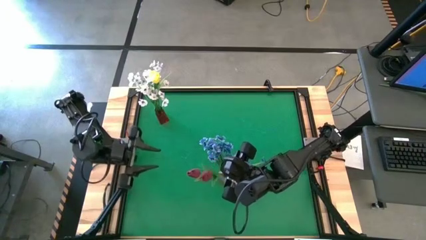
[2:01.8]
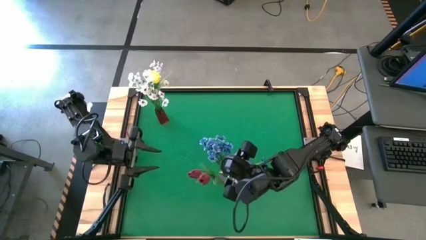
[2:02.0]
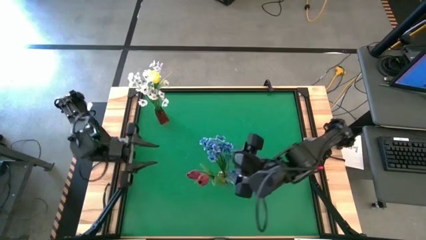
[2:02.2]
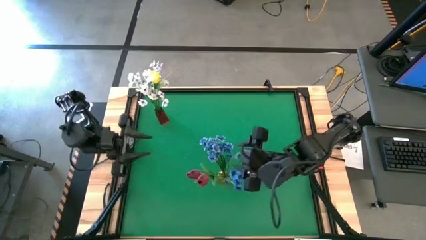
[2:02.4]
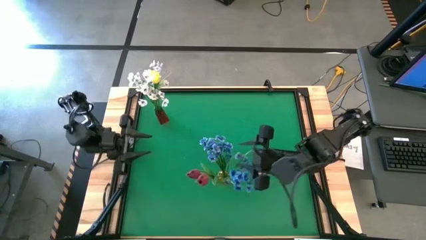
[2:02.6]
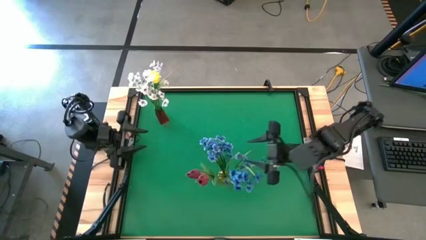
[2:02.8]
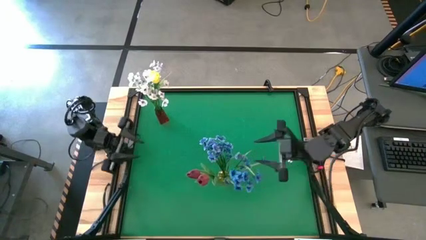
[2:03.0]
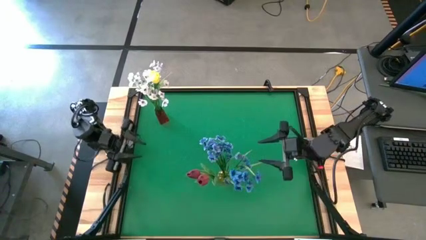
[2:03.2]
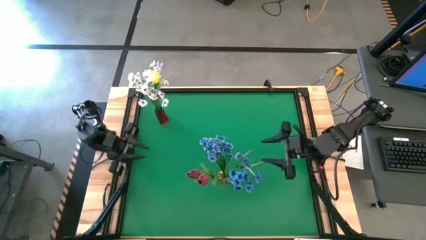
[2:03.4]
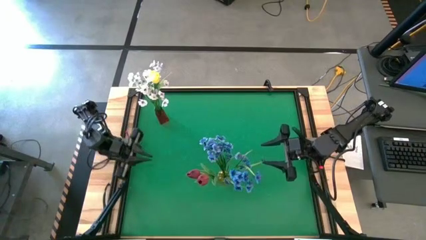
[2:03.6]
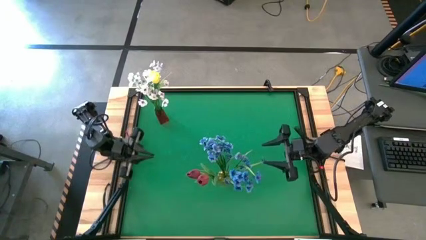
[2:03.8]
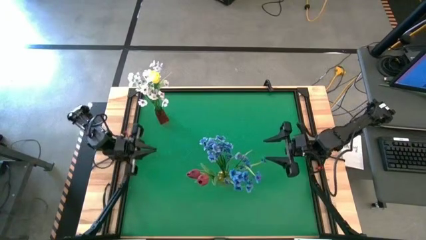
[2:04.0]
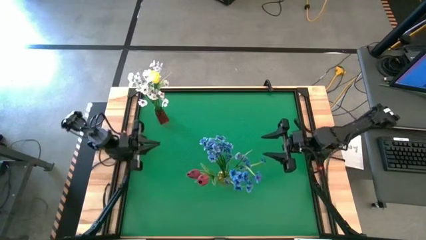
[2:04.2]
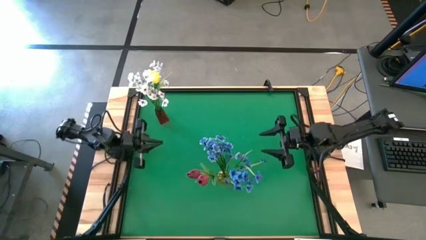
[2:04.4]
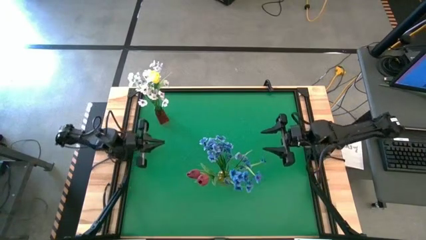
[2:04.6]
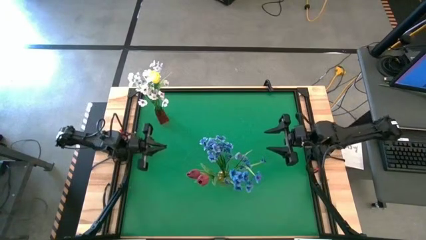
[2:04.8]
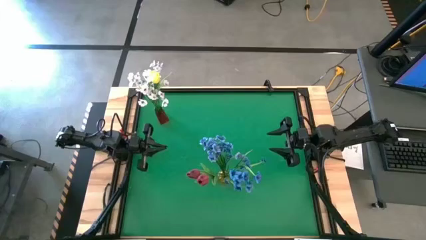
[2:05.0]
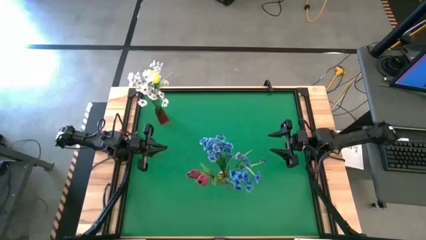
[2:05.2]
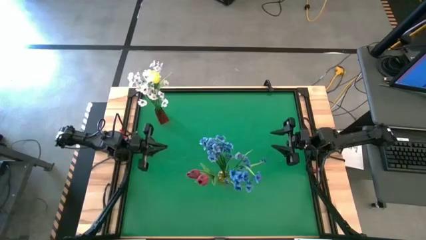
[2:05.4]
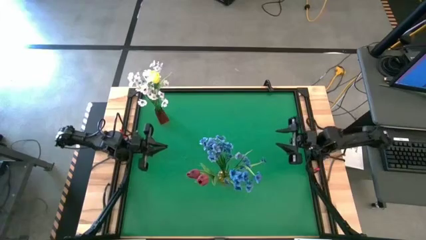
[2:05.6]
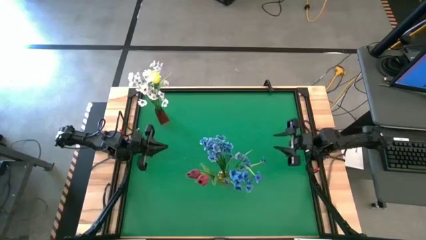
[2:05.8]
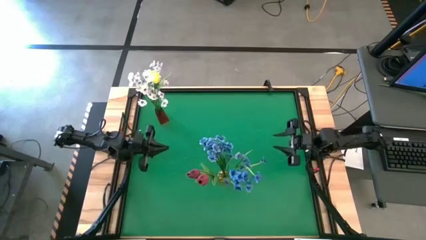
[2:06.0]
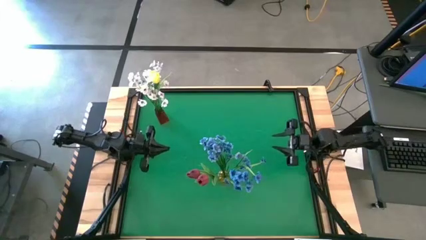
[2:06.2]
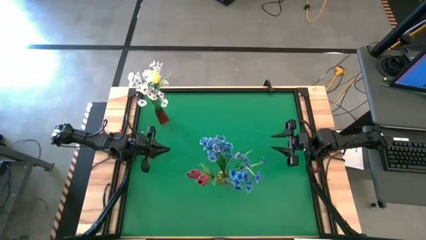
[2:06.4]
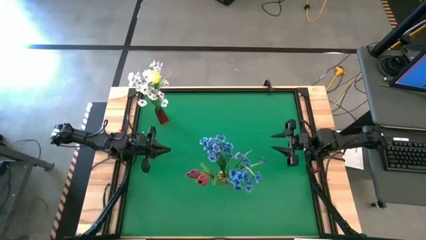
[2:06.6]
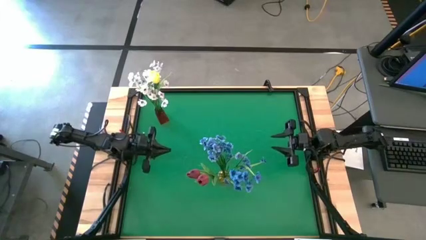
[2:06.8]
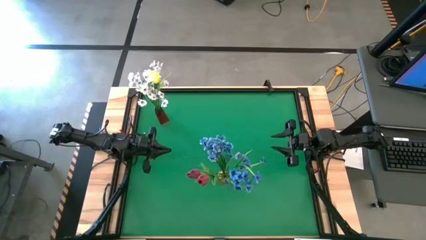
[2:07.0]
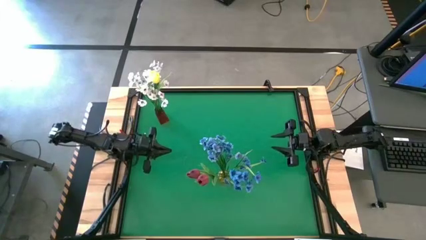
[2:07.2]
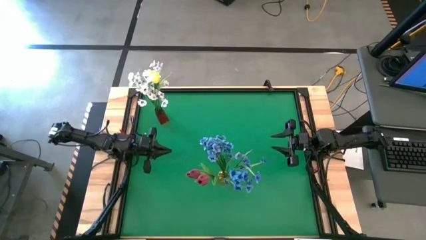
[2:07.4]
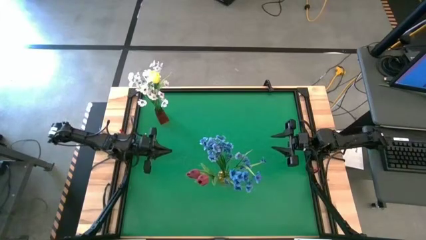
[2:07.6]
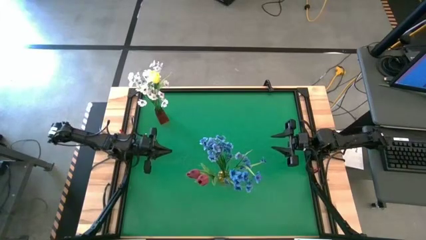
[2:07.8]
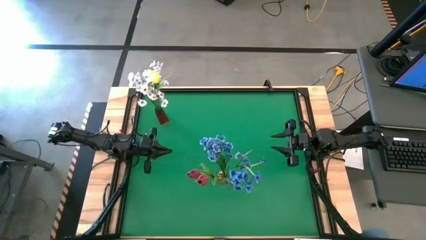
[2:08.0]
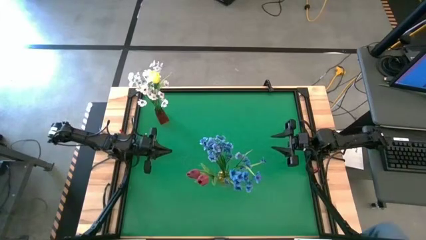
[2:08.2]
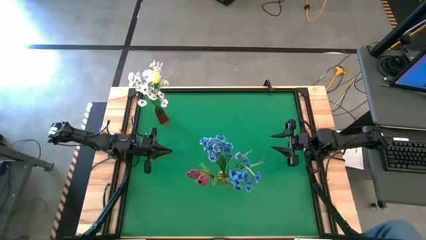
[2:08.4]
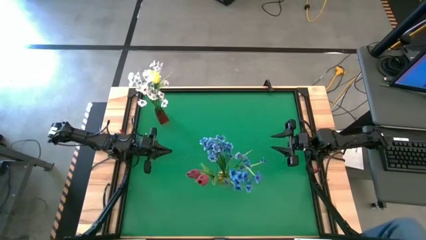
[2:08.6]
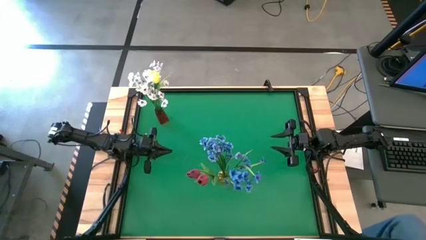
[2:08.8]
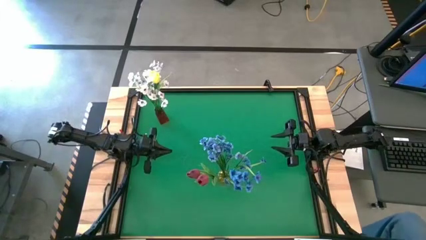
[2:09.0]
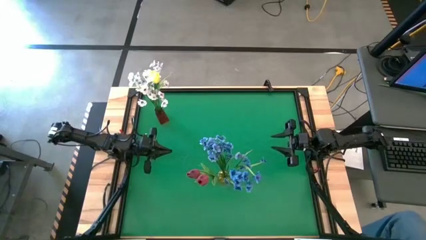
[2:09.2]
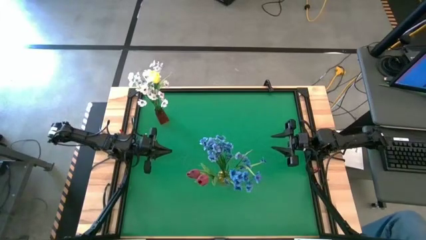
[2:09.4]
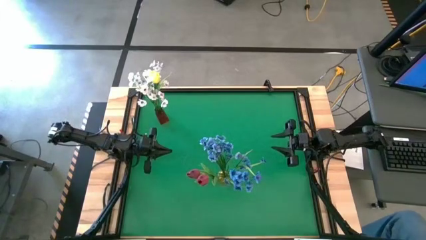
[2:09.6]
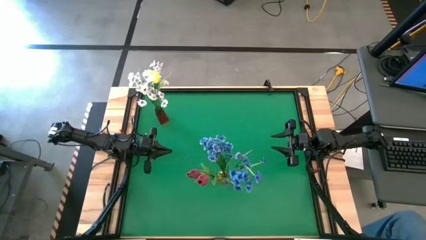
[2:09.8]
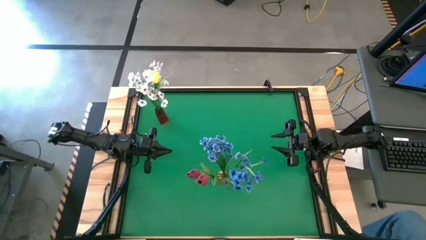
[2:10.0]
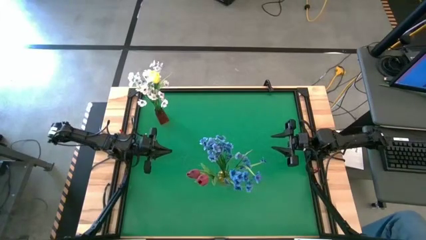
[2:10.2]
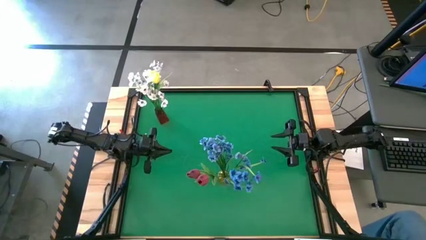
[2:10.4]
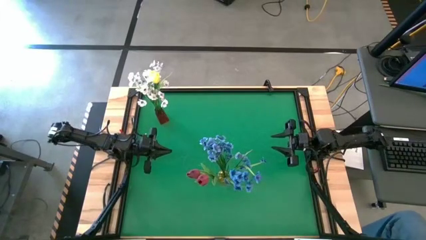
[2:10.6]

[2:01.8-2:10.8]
Task: Sort flowers into vase by color
Return to Home Position

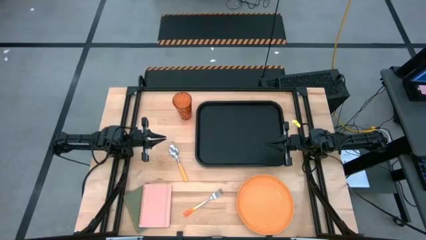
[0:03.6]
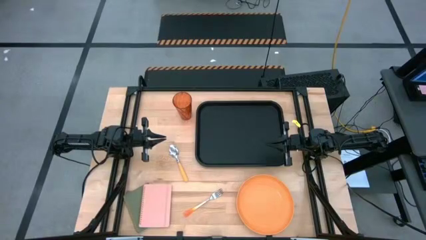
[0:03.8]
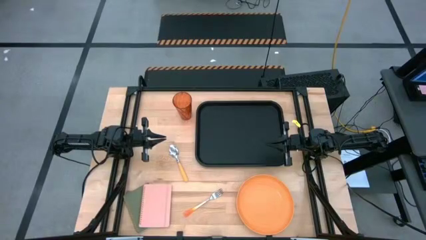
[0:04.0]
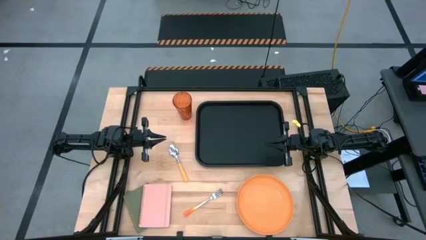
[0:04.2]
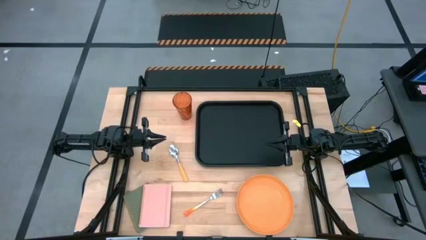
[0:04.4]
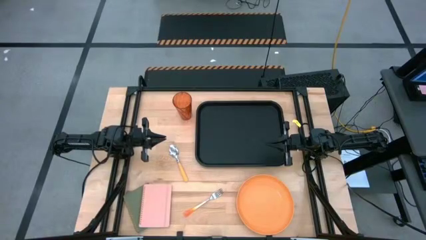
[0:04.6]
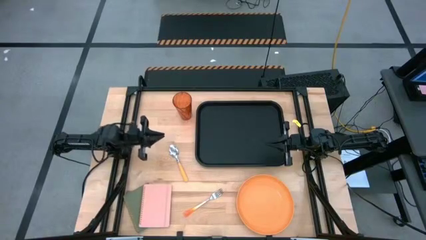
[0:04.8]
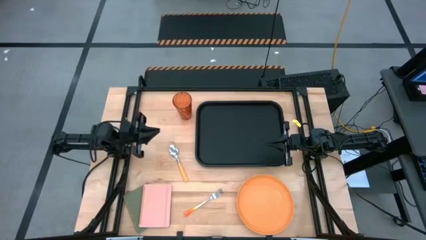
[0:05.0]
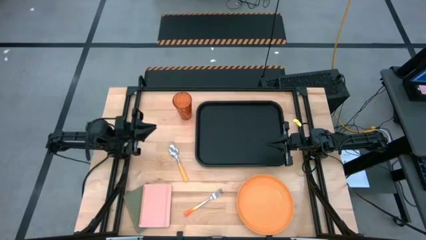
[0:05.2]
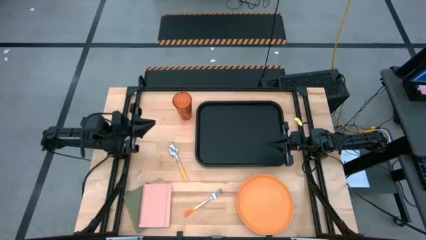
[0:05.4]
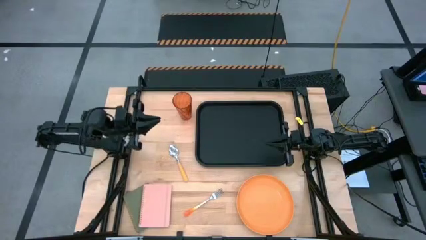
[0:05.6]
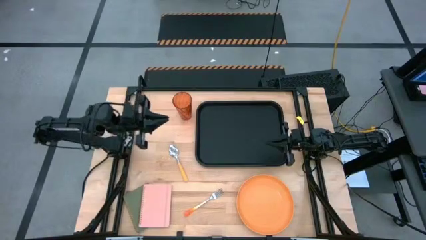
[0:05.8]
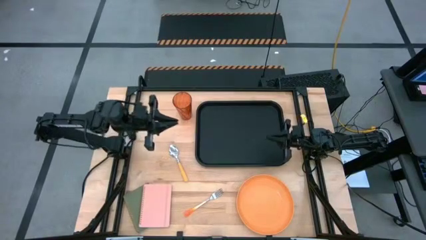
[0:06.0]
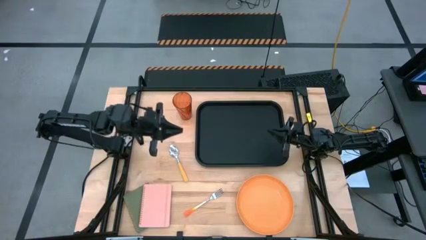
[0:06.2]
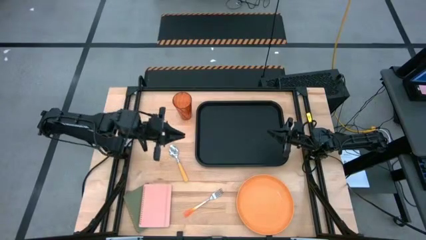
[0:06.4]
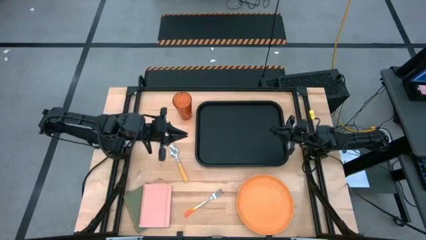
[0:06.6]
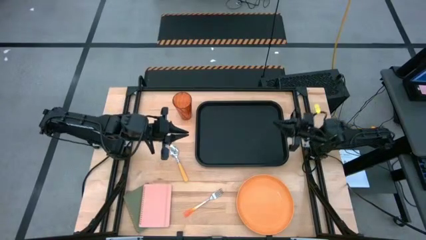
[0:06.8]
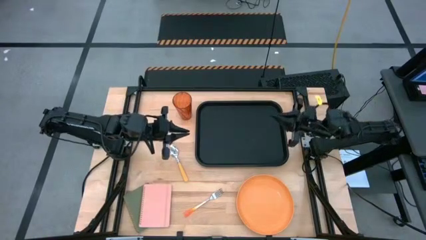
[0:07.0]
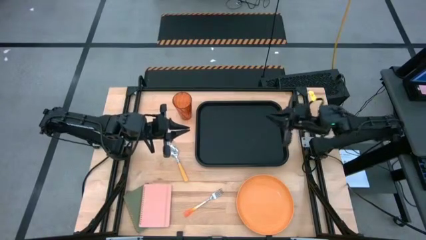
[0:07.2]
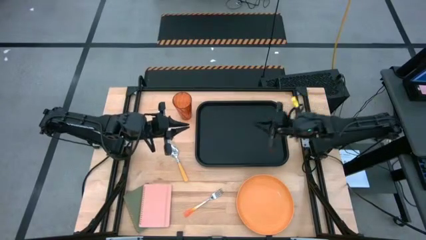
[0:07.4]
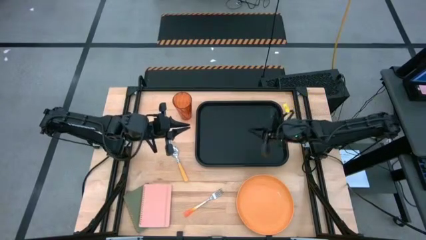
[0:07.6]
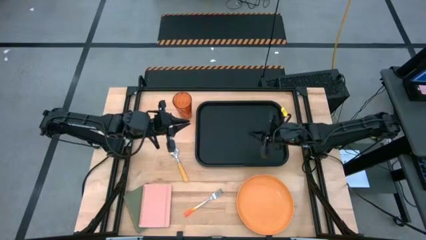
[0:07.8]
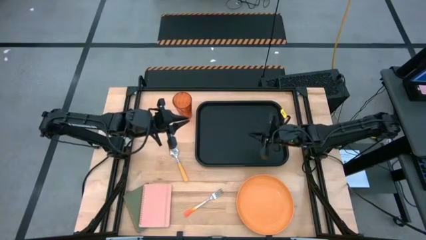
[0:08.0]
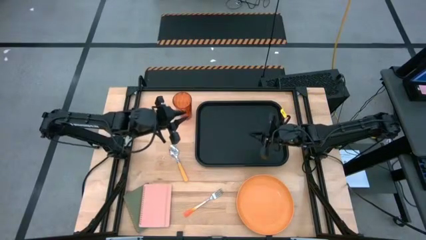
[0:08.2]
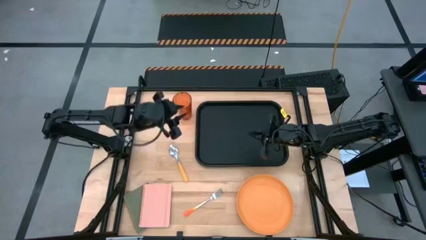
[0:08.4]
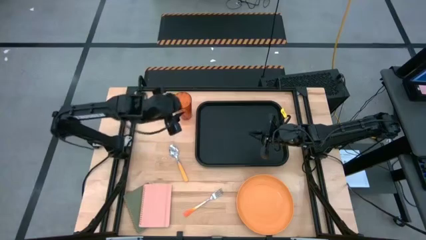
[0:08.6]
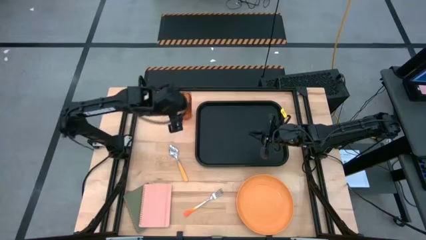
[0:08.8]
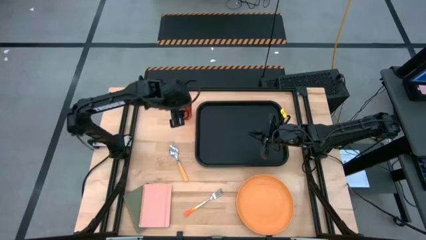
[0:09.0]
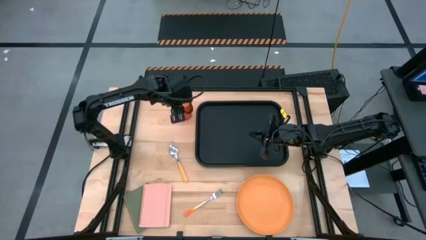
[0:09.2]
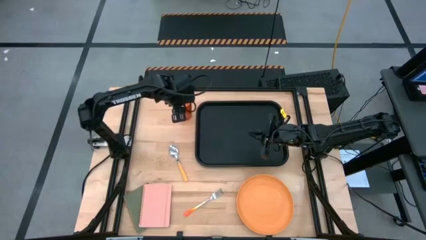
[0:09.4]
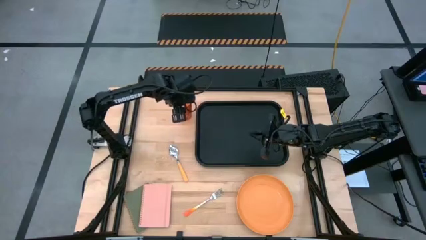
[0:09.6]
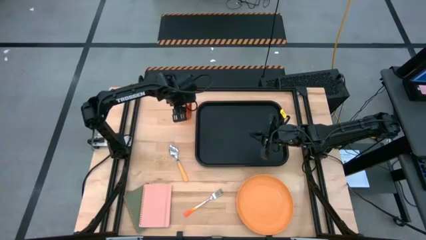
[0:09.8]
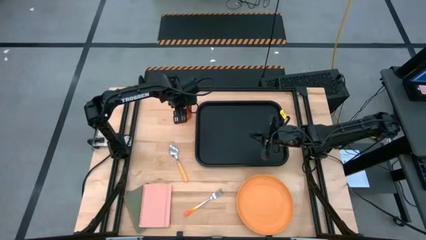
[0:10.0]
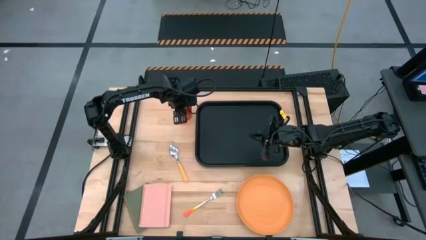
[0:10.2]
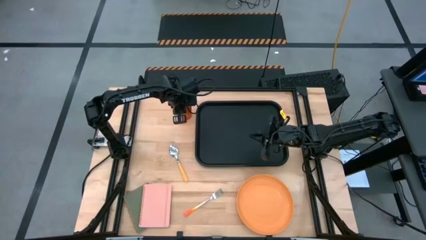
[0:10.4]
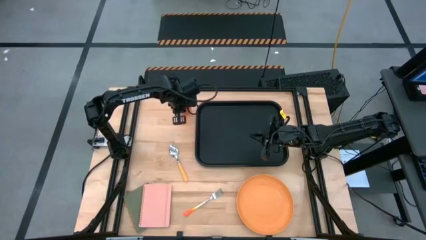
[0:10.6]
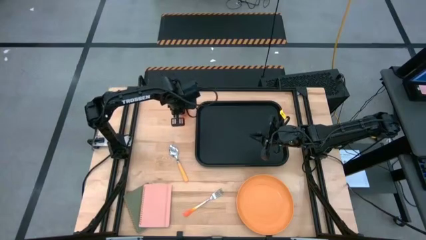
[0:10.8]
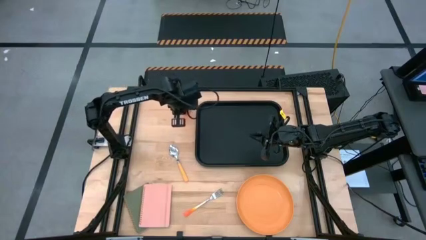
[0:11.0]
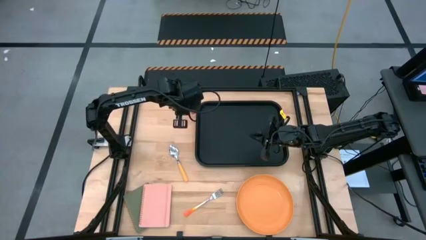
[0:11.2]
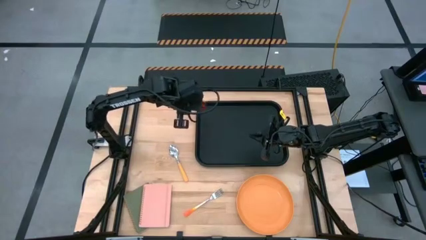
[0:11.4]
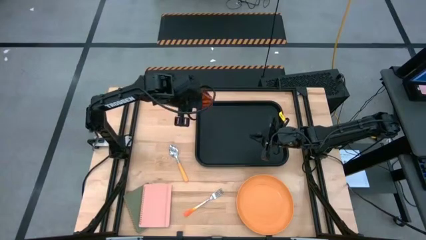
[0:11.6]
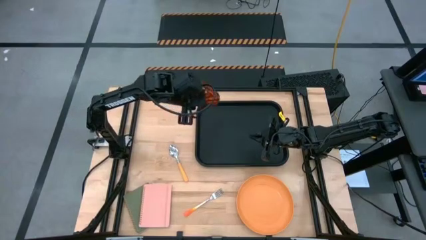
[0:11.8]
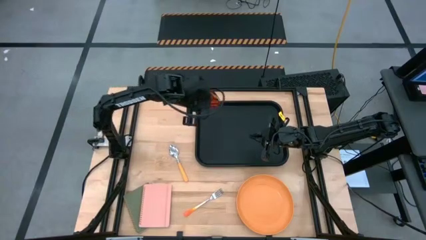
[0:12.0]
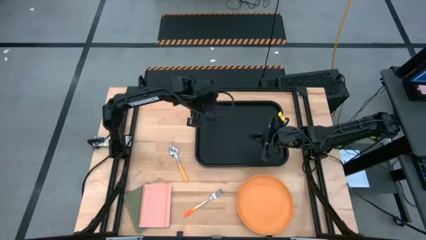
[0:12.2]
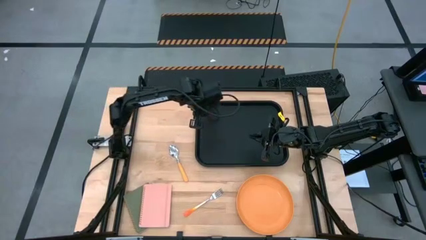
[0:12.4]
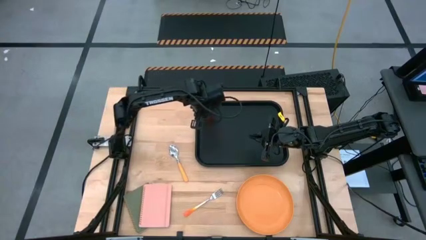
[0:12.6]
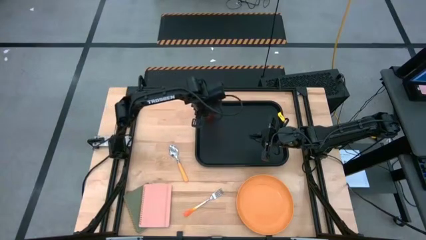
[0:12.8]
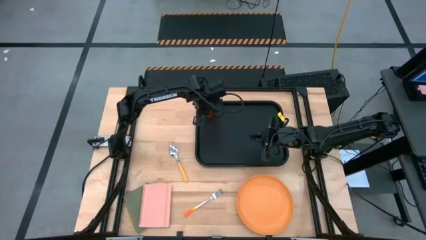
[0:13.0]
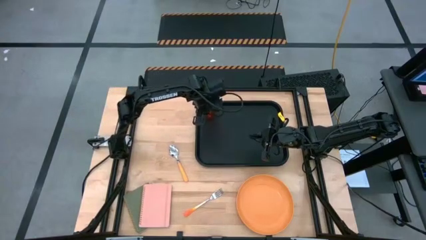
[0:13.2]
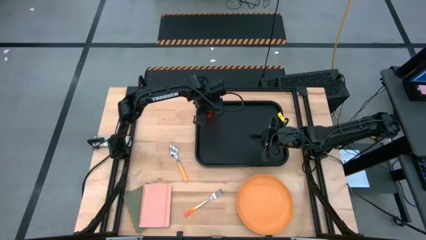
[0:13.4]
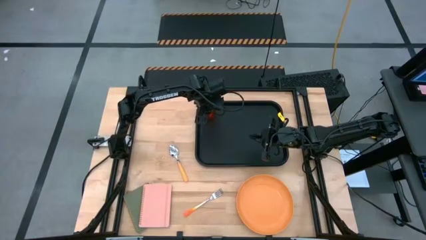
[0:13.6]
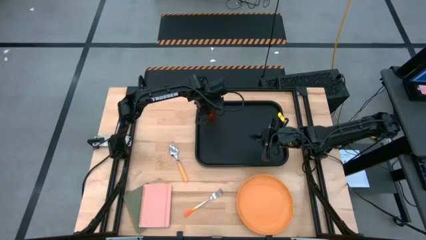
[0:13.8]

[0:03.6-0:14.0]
Task: Pick and place plate/cup/fork/spoon on tray
Put the orange cup on the black serving tray
